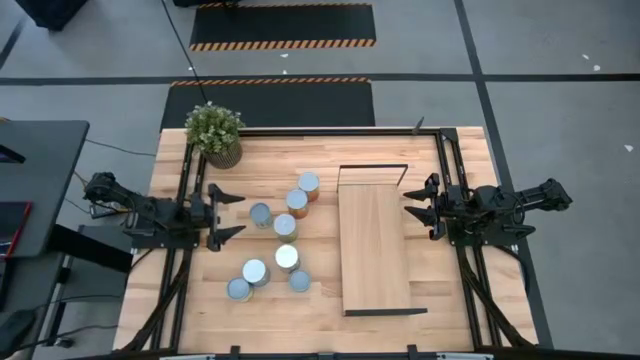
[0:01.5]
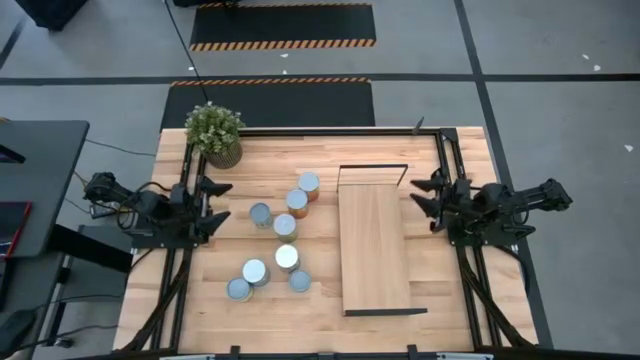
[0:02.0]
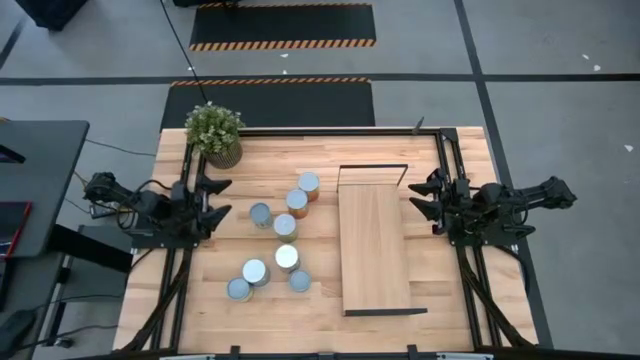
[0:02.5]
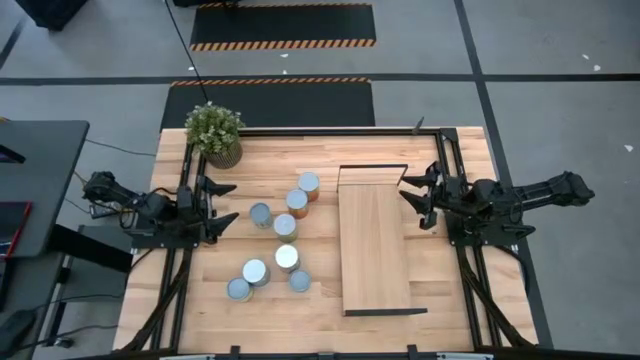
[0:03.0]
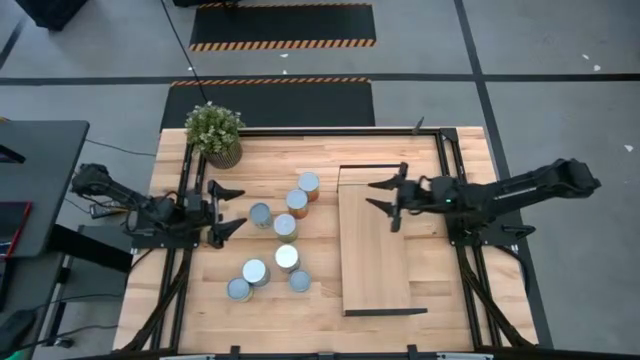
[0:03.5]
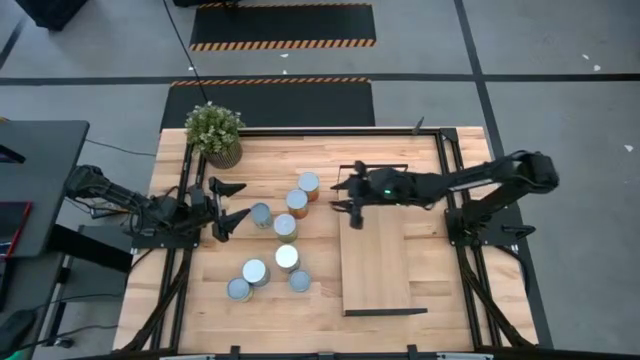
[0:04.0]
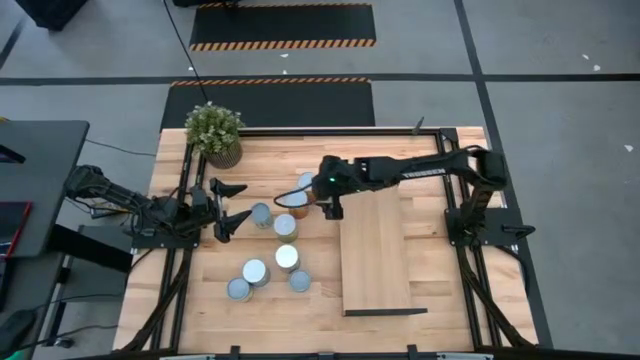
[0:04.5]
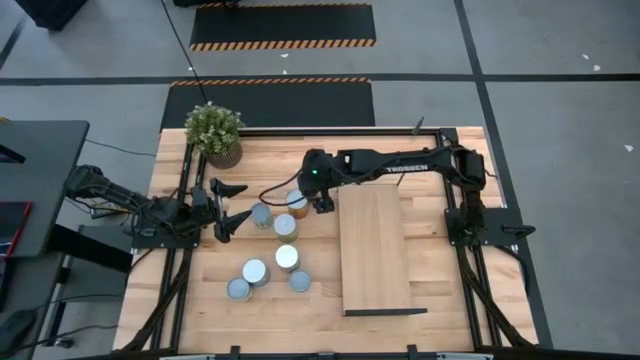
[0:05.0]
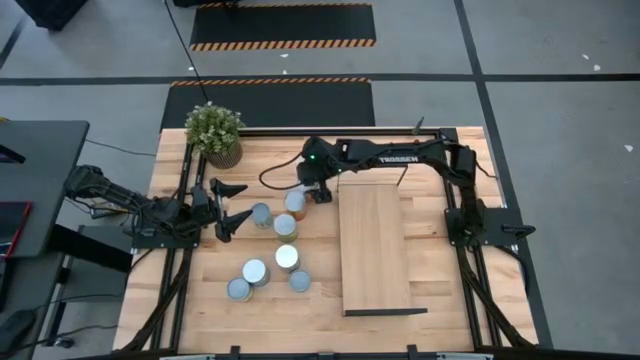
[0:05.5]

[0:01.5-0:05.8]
Task: Pick and place cans onto a shelf
Put the canned corn on the shelf

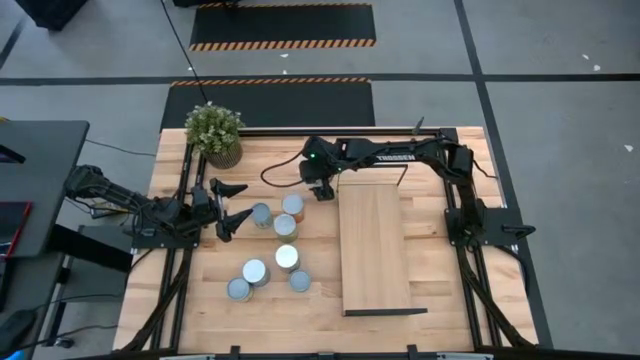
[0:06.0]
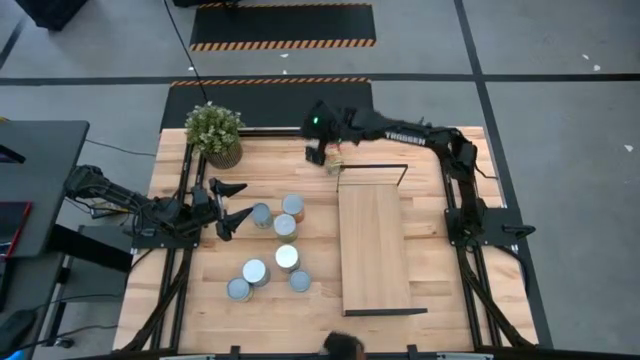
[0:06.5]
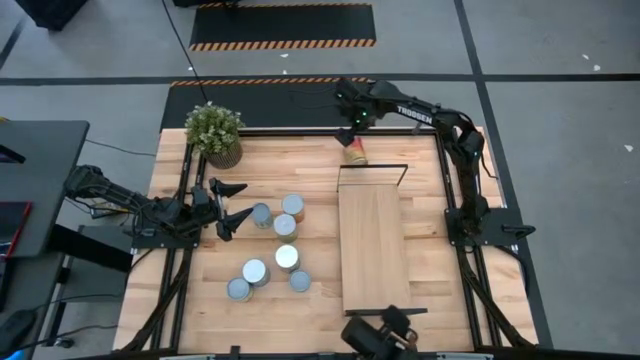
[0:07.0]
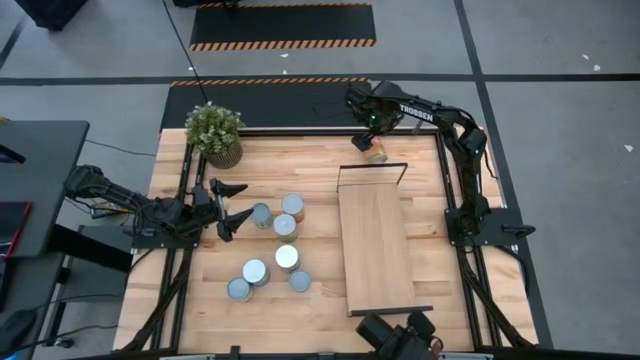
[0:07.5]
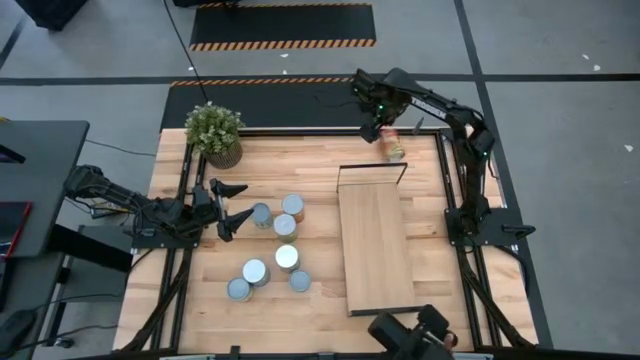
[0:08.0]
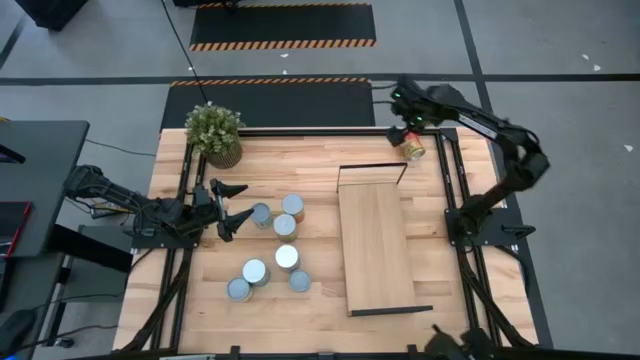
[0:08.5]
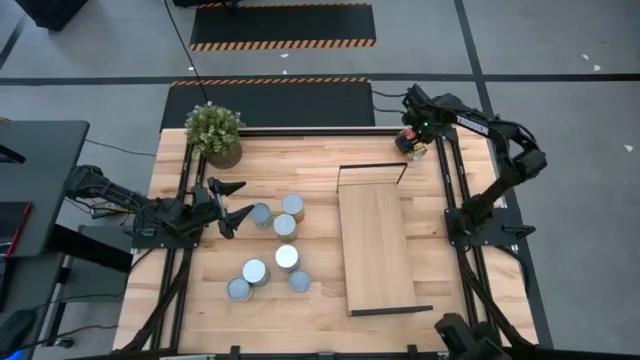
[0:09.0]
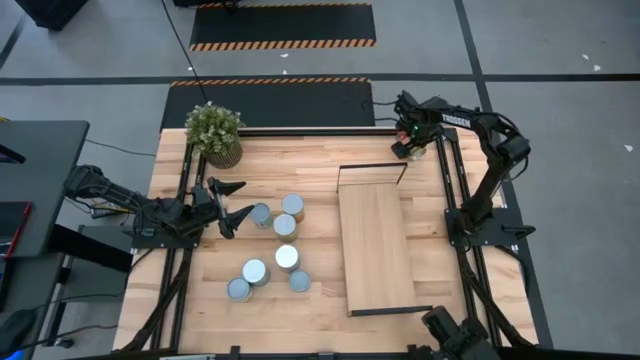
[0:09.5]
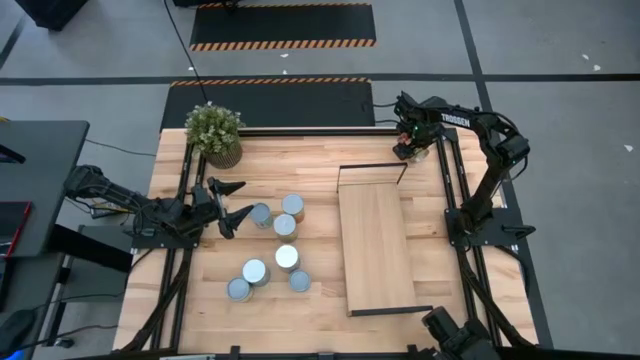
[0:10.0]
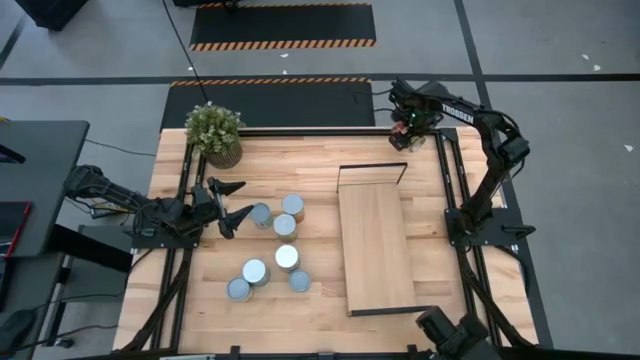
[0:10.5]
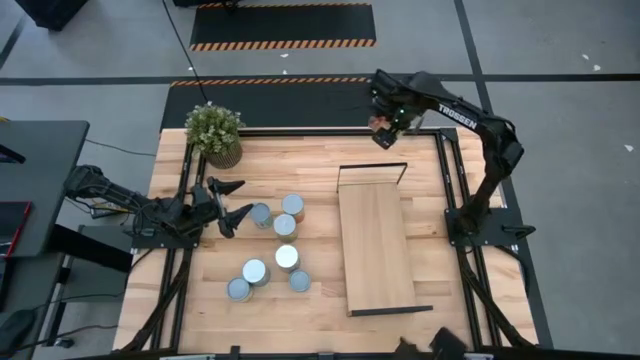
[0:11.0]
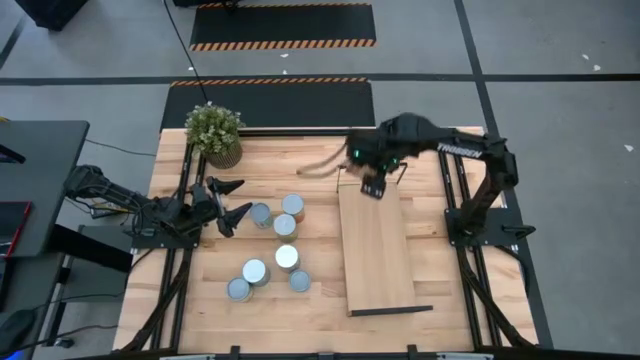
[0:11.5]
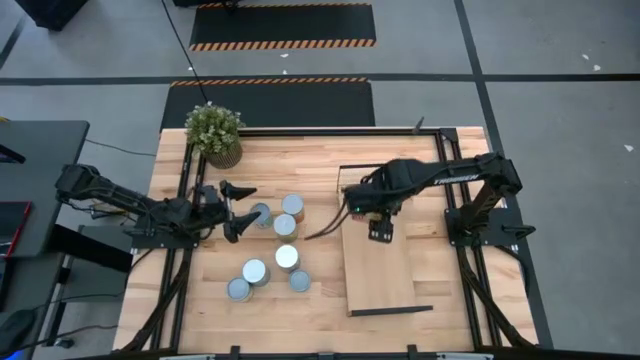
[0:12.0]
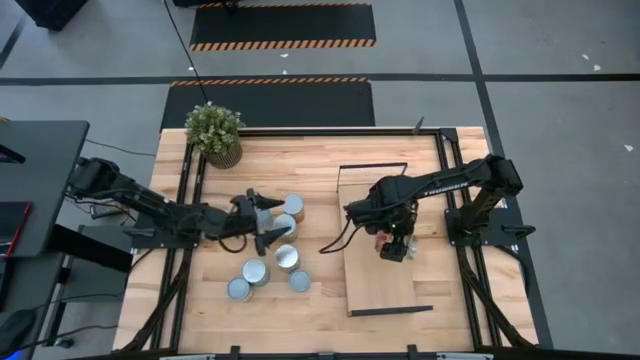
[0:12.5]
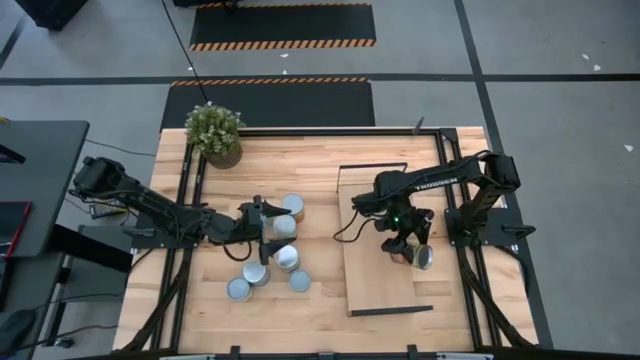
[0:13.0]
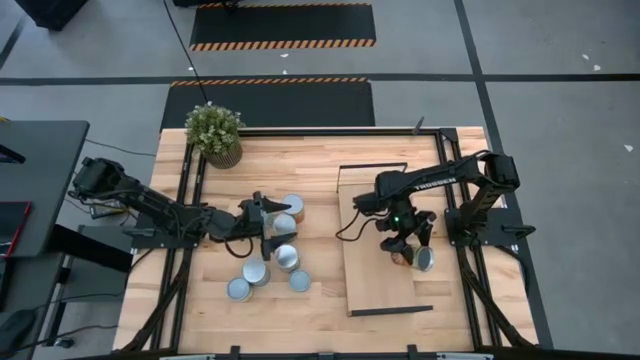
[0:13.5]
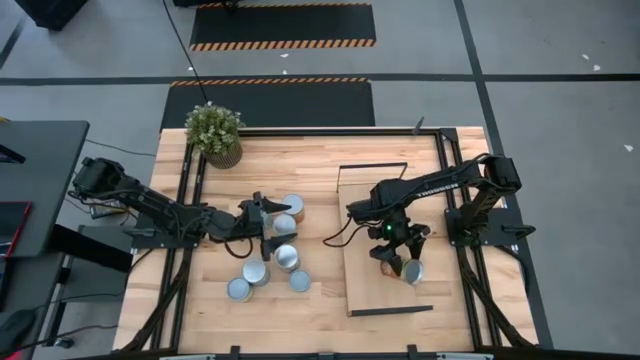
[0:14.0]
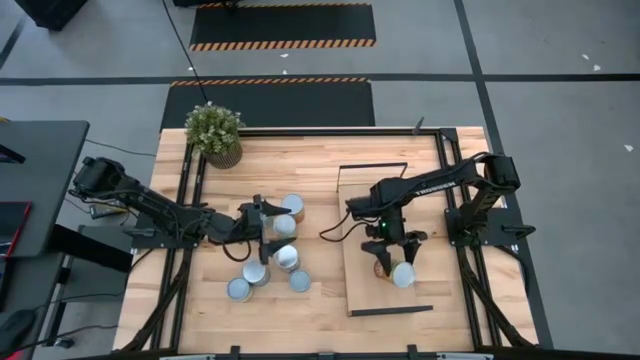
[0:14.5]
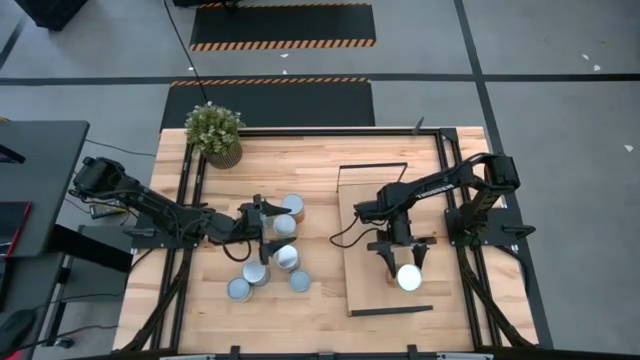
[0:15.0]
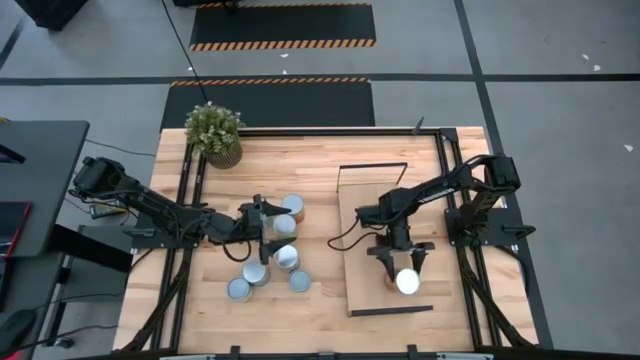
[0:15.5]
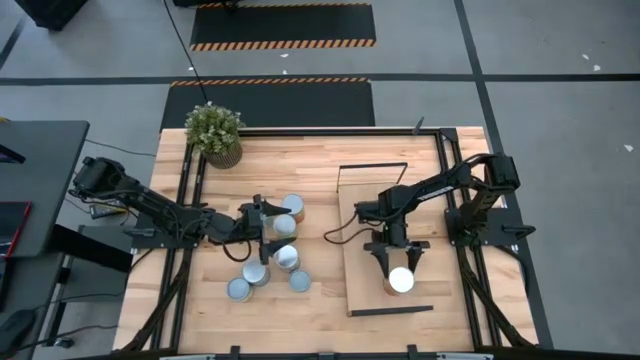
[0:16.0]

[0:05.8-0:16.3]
Put the canned corn on the shelf

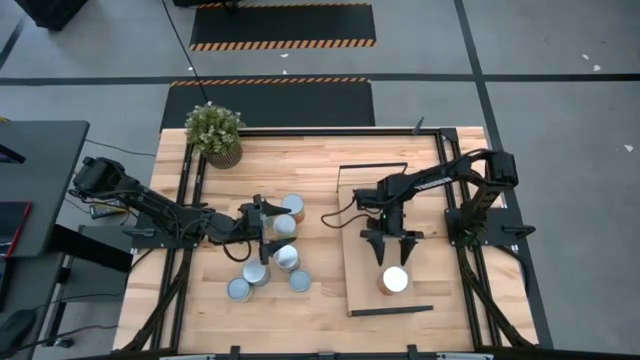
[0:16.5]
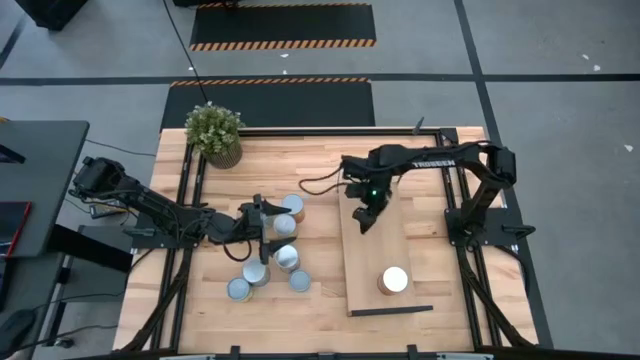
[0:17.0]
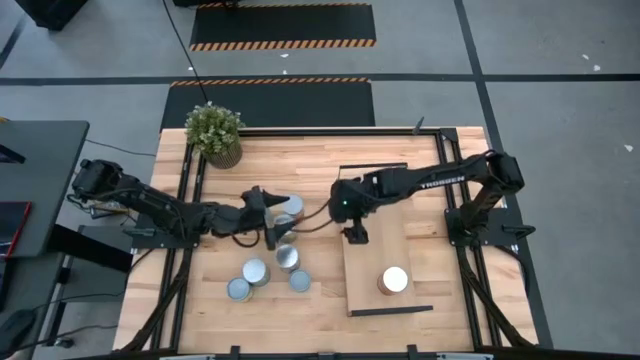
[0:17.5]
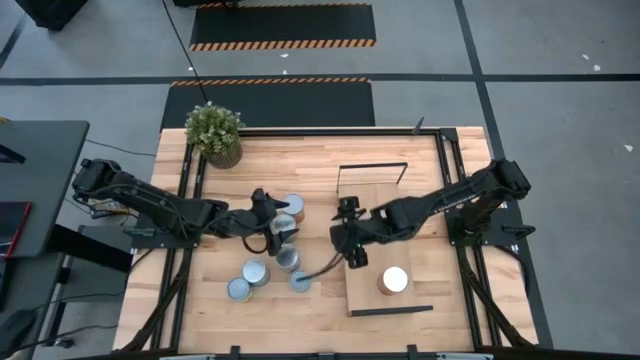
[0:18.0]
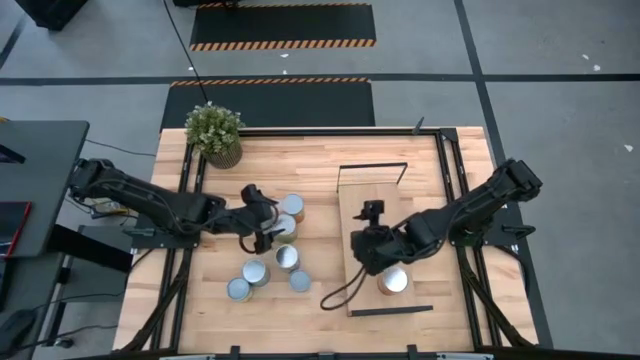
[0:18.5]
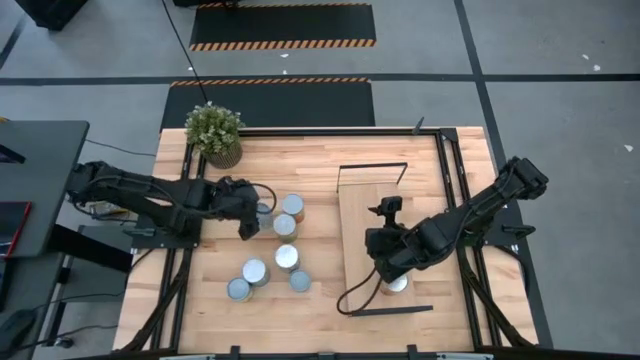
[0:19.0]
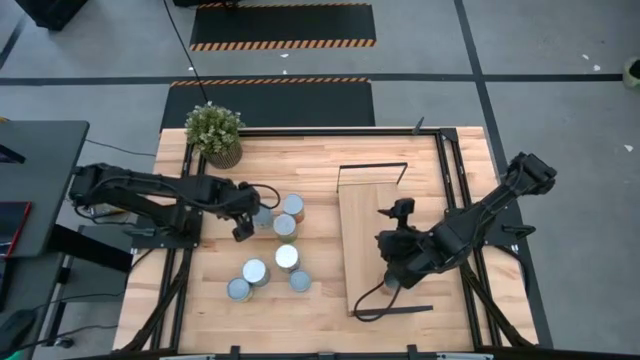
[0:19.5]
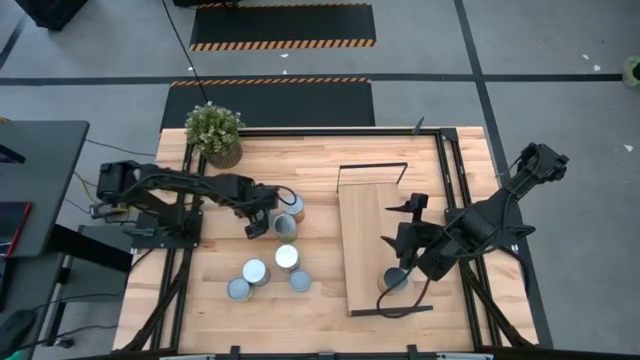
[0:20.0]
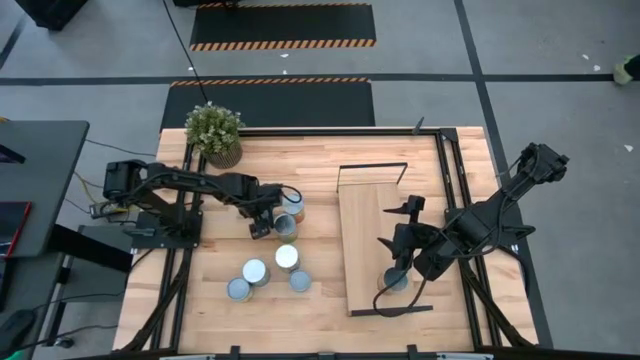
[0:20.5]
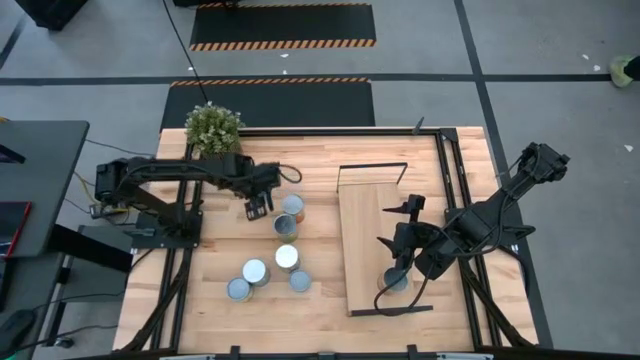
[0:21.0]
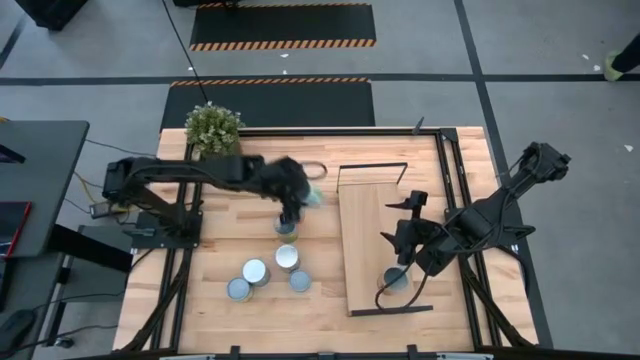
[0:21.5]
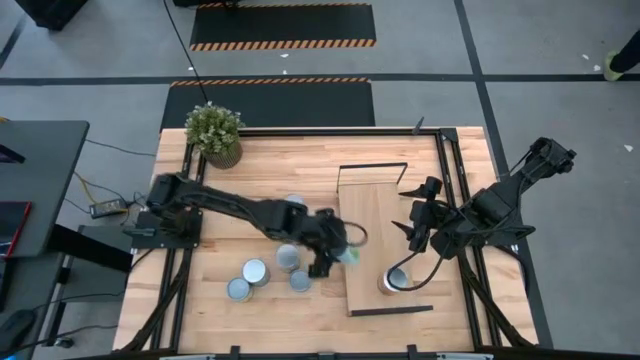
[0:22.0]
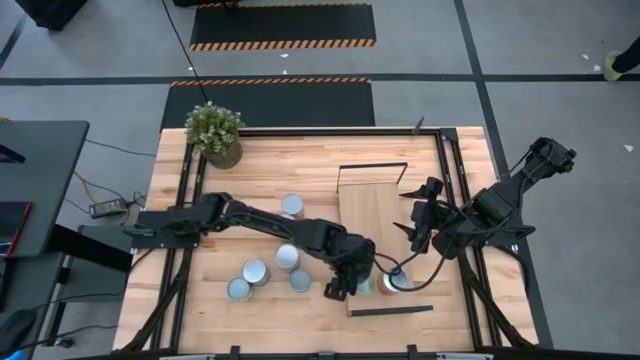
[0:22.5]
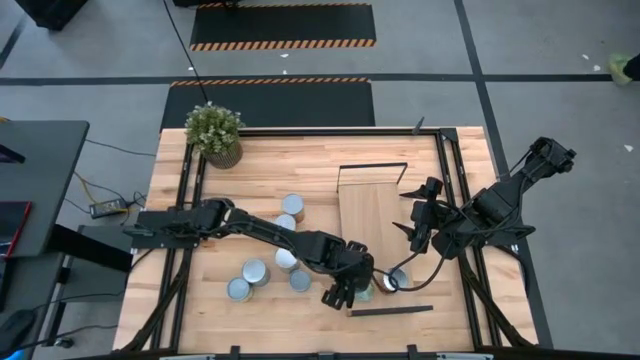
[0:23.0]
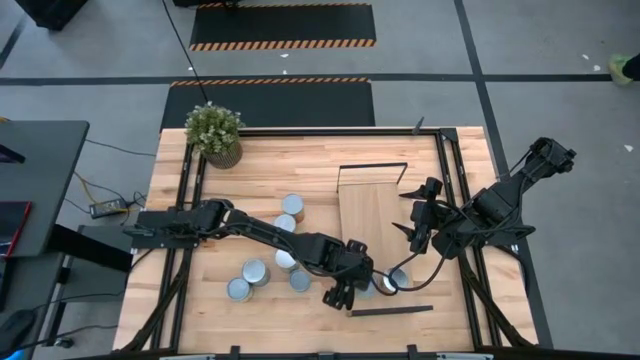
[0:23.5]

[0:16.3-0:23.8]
Put the canned carrots on the shelf
